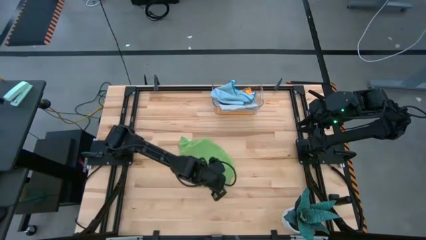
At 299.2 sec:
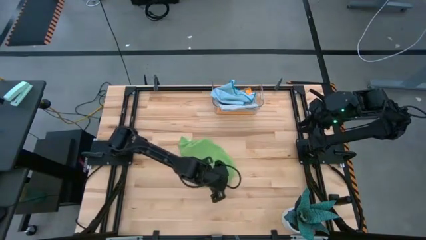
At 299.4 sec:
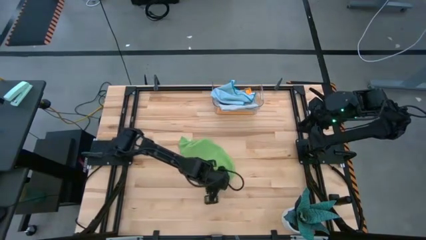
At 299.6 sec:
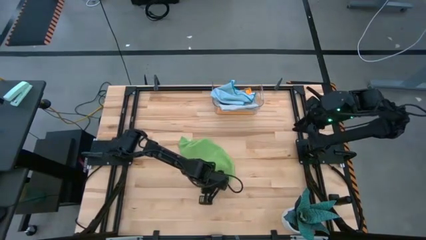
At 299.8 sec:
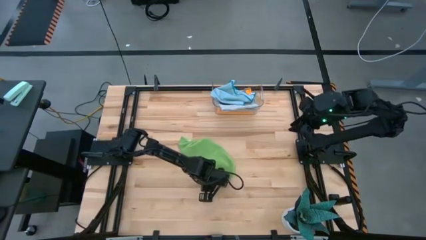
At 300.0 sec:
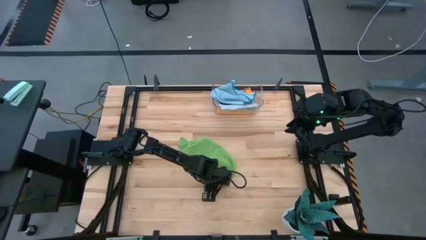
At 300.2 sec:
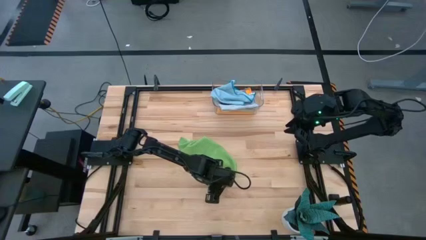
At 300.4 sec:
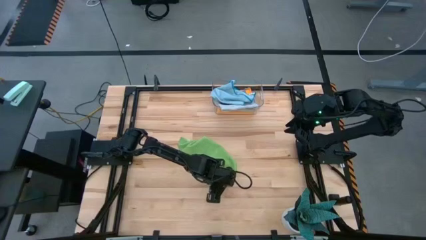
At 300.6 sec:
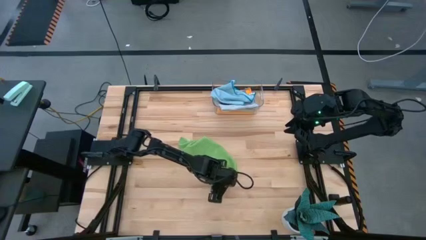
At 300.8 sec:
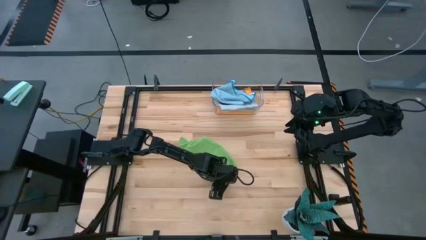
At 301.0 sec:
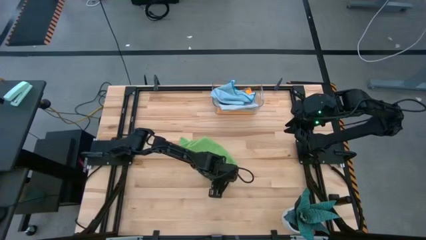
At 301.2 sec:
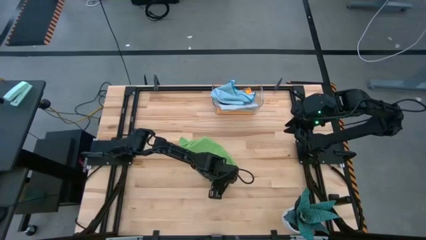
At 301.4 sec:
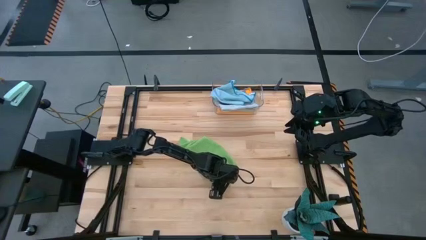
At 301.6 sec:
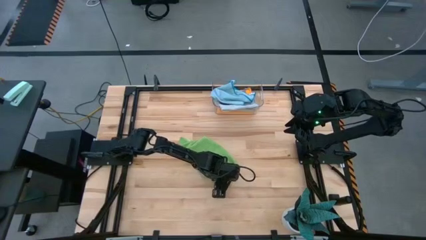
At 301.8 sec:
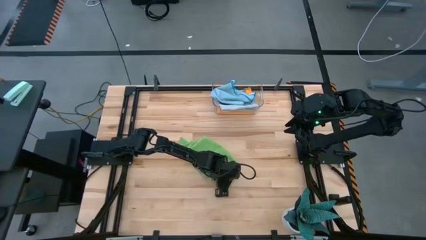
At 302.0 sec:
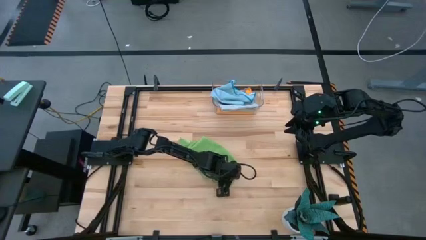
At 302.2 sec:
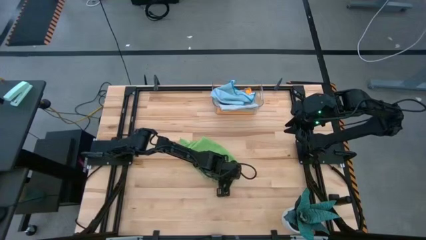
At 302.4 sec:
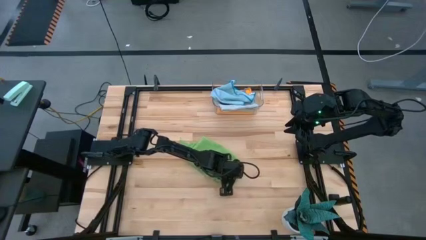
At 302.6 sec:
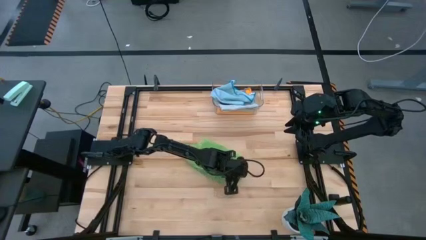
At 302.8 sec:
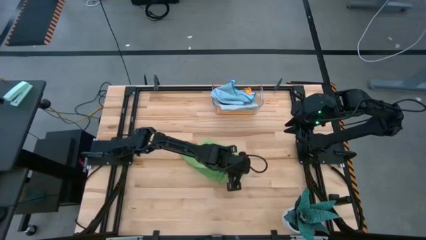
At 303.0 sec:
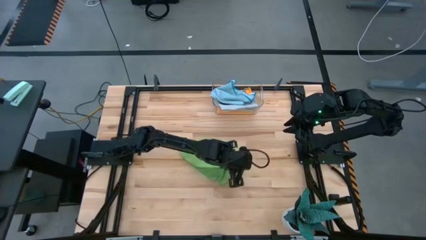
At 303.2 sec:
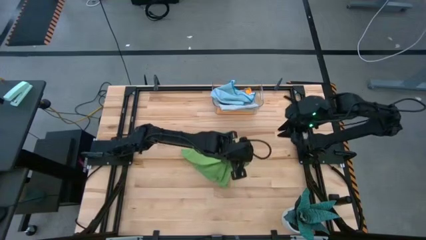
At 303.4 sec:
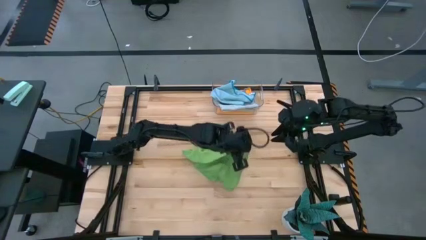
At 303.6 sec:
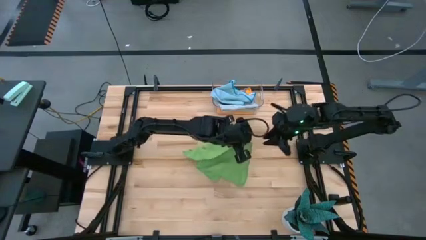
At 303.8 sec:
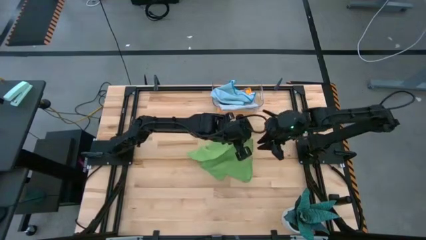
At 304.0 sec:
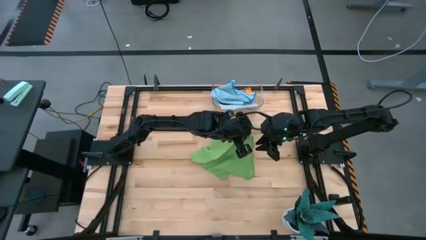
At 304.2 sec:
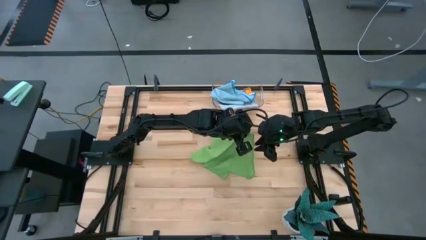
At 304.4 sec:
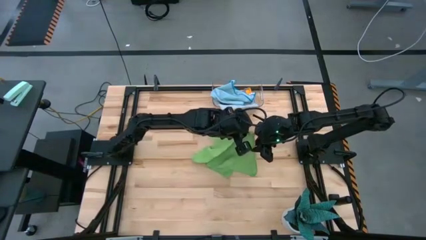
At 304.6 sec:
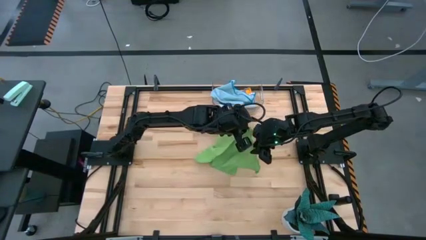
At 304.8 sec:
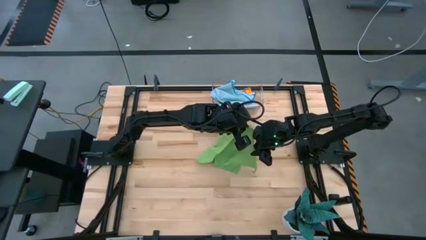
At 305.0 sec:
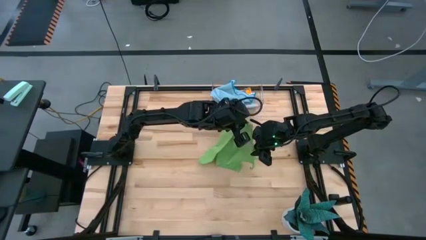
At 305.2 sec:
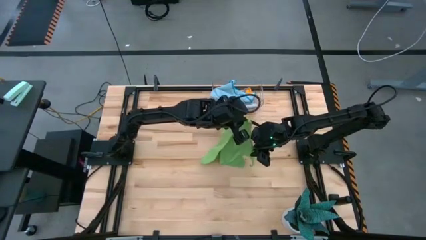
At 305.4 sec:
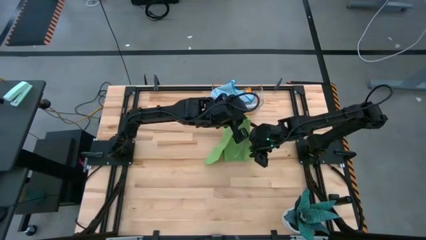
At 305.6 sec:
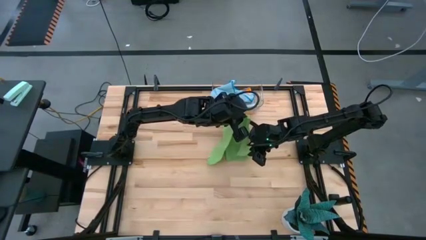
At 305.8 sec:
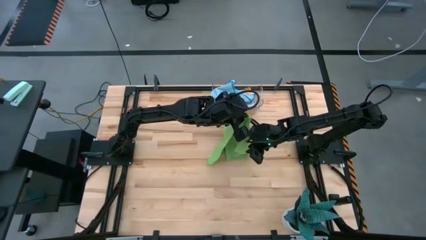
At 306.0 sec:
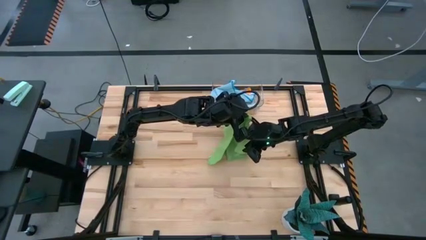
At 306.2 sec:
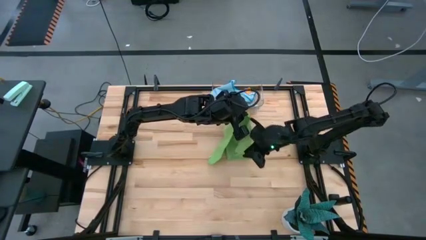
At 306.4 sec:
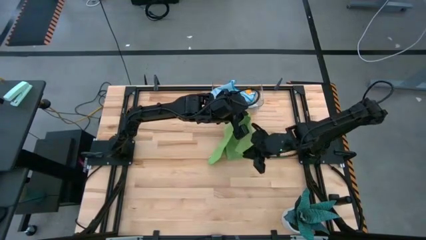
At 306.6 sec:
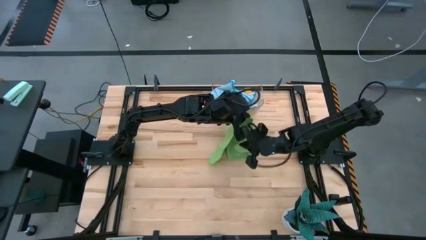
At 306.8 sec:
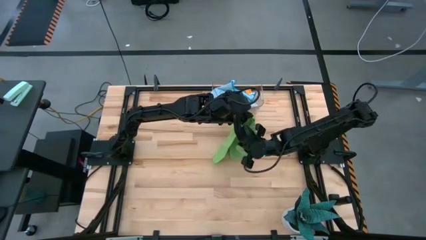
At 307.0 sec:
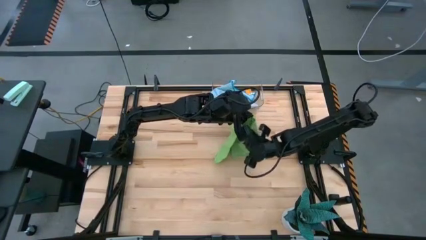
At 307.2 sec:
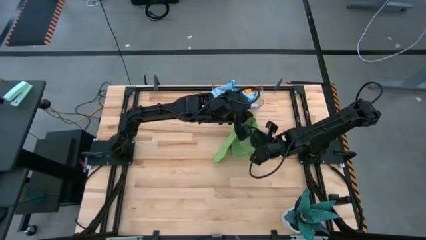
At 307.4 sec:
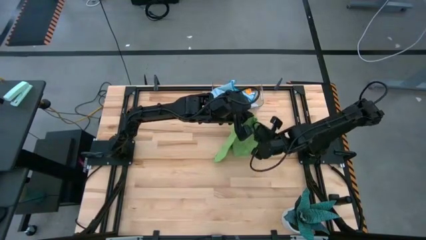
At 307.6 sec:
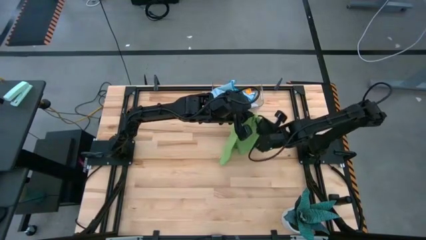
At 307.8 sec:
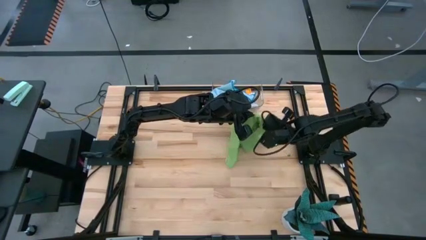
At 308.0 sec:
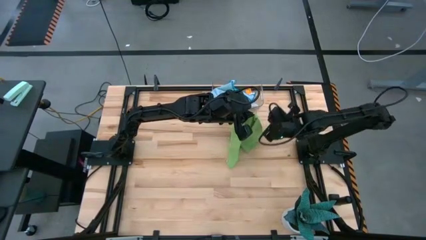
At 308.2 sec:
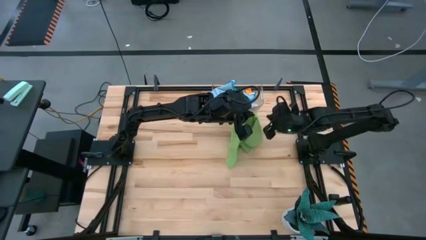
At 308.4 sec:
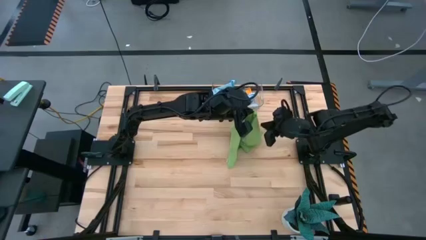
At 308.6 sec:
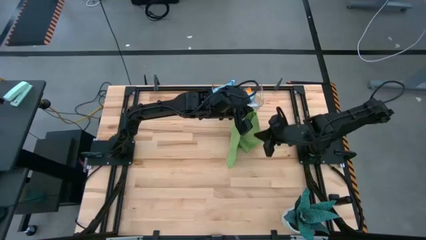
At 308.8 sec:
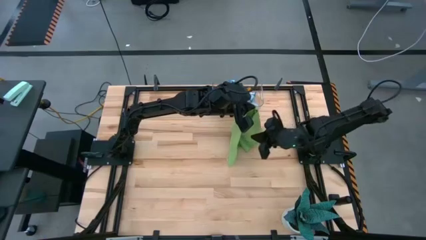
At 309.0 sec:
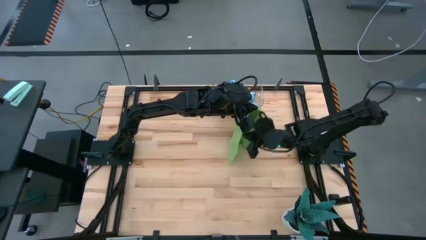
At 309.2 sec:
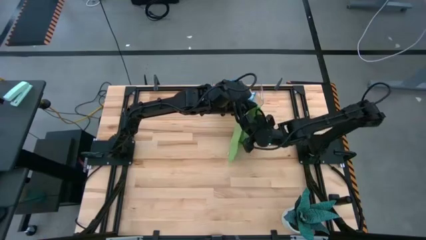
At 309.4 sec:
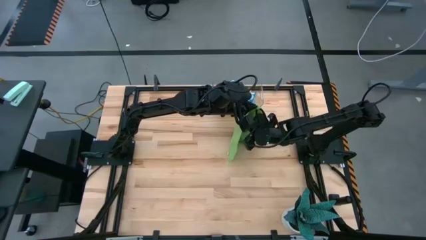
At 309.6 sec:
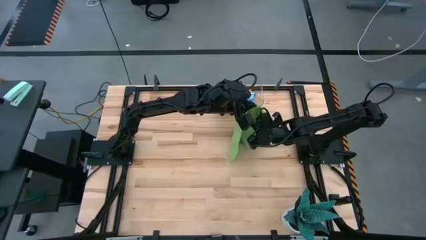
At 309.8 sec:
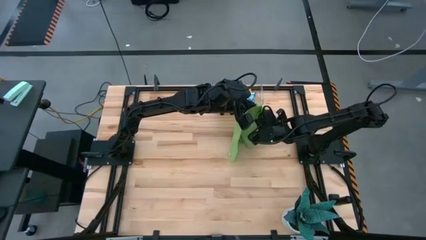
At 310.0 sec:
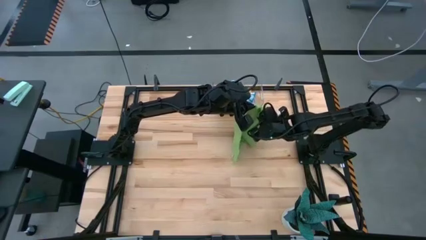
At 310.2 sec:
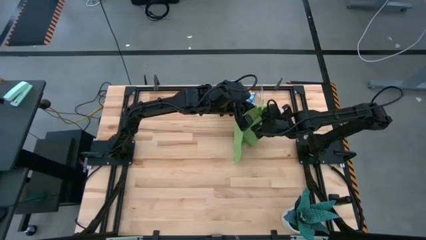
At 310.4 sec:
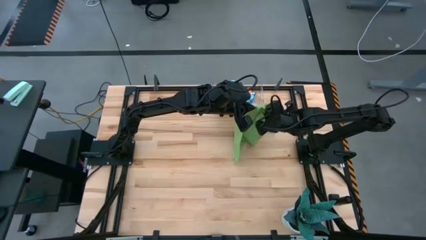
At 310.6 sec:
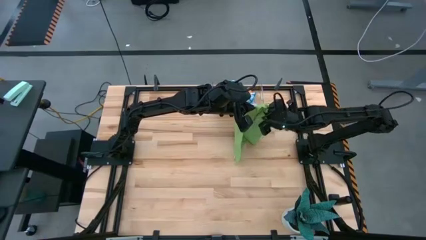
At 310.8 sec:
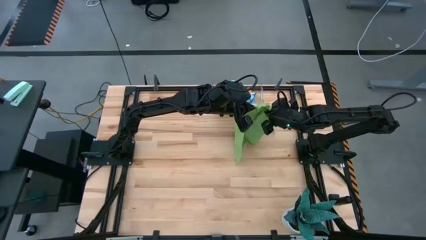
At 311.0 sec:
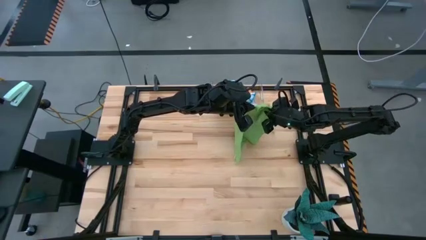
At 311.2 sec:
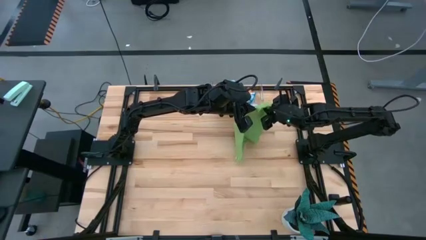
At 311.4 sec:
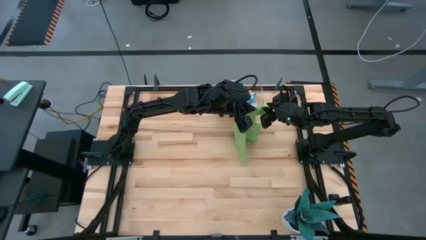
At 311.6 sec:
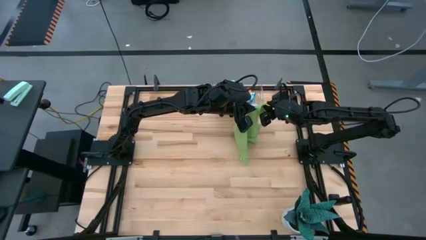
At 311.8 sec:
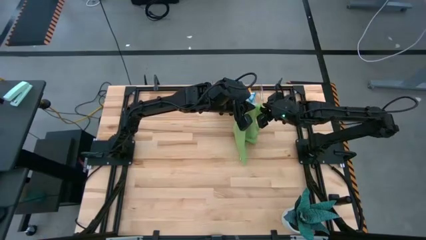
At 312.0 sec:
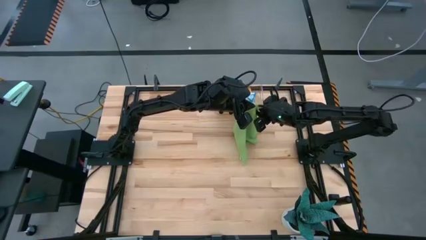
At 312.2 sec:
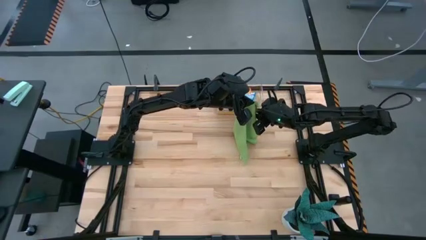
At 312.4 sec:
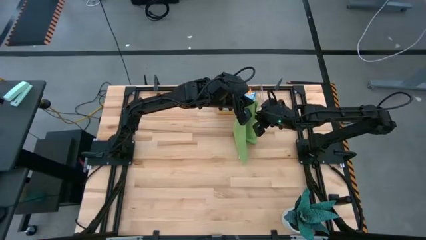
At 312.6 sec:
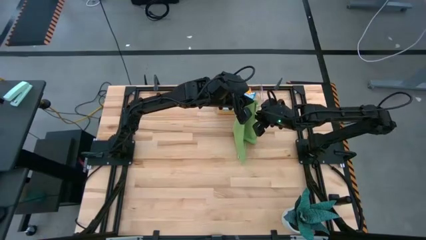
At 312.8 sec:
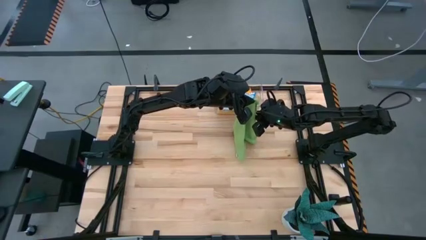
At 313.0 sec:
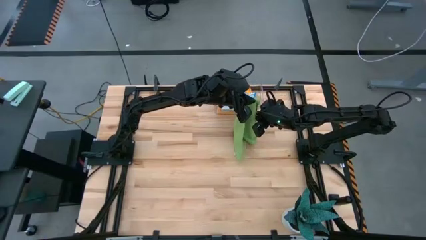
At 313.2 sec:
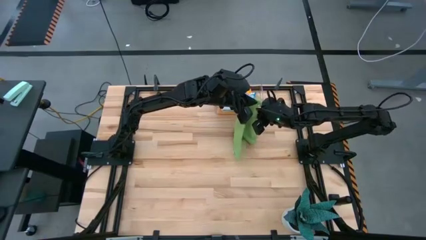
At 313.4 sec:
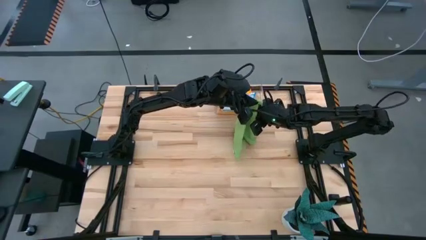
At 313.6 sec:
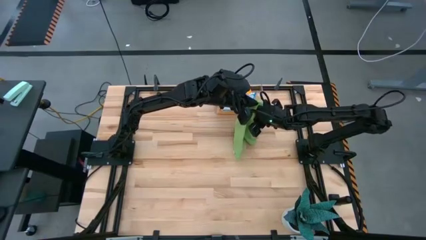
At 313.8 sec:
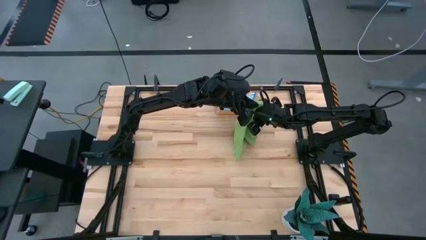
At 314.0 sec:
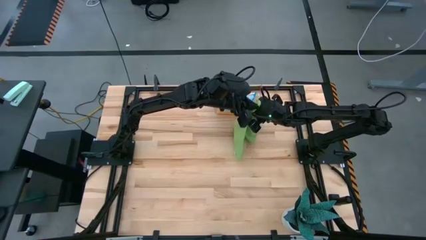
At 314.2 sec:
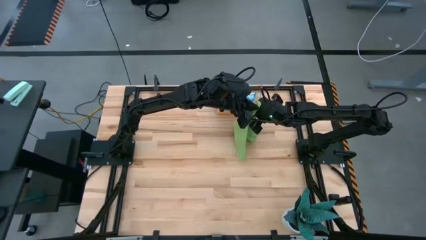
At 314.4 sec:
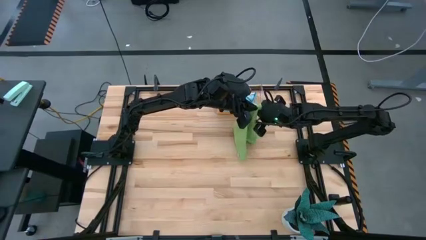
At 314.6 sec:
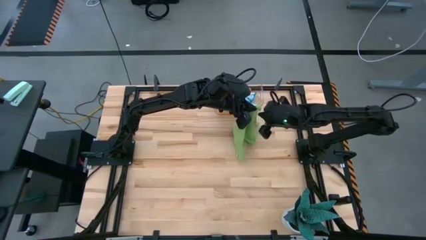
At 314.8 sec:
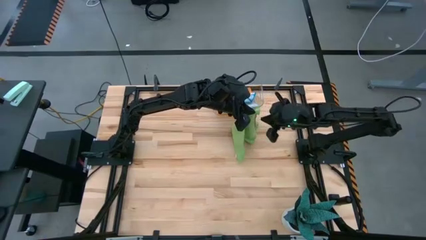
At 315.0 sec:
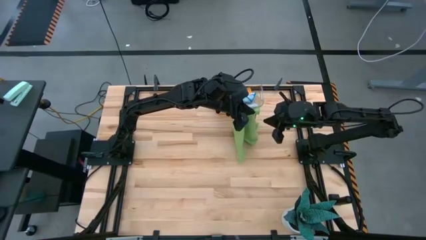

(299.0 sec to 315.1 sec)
Task: Fold microfiber towels
Fold the green microfiber cloth
